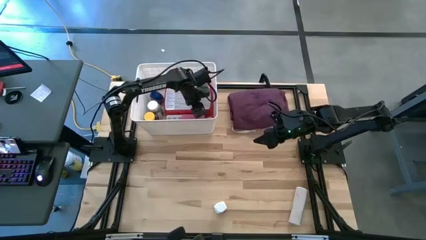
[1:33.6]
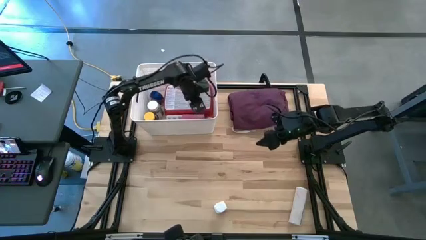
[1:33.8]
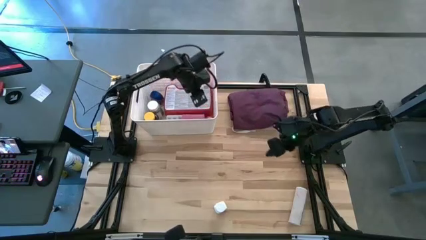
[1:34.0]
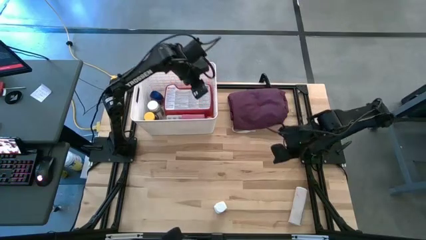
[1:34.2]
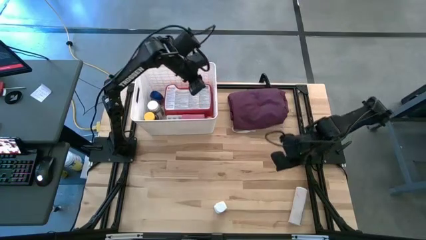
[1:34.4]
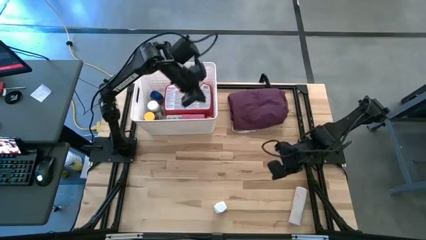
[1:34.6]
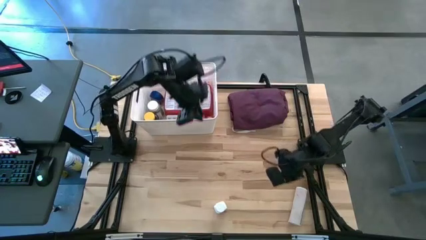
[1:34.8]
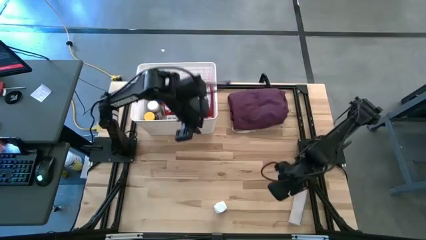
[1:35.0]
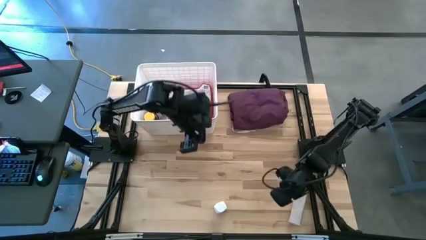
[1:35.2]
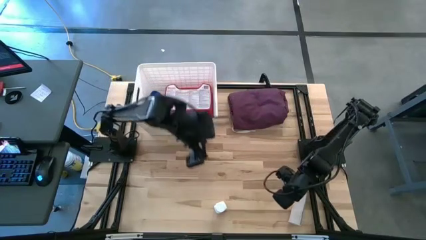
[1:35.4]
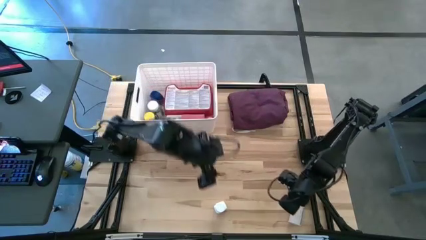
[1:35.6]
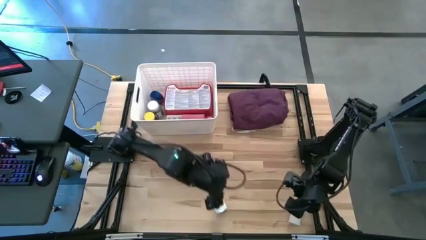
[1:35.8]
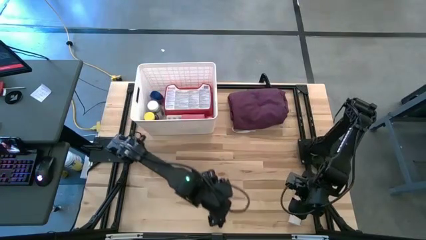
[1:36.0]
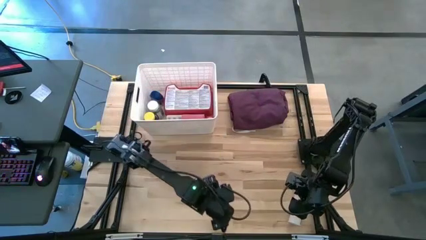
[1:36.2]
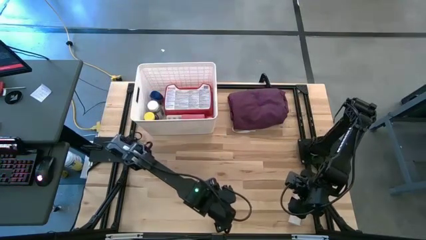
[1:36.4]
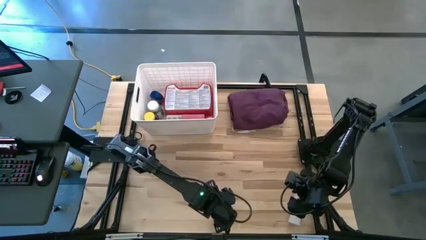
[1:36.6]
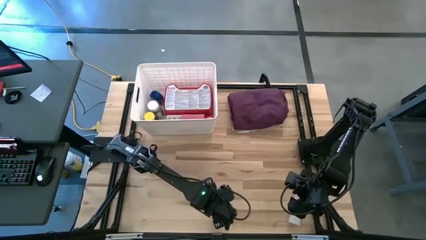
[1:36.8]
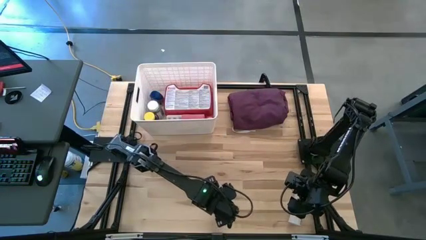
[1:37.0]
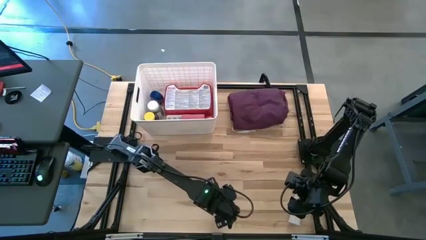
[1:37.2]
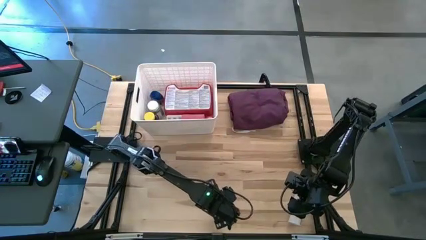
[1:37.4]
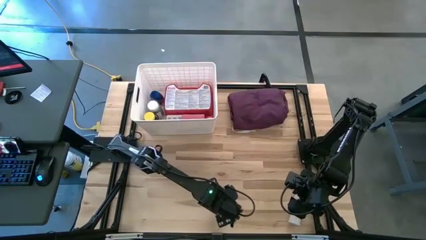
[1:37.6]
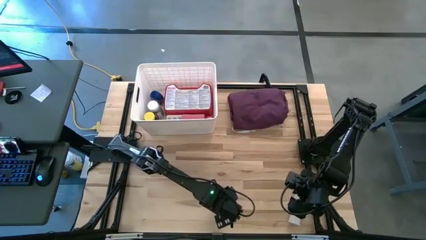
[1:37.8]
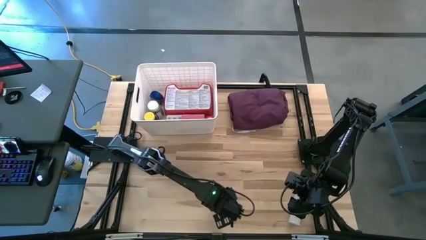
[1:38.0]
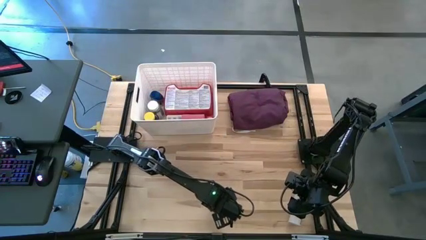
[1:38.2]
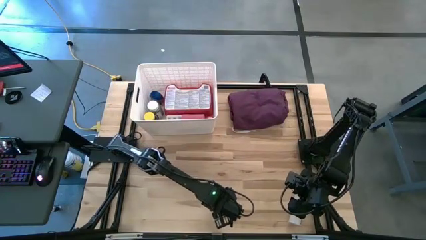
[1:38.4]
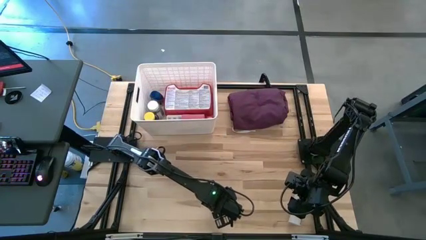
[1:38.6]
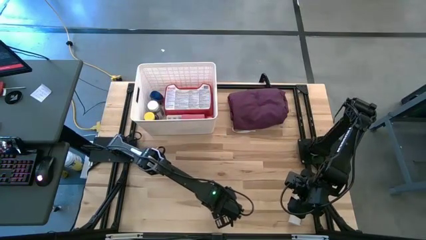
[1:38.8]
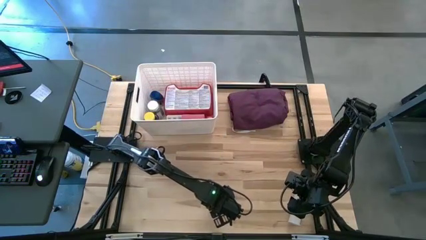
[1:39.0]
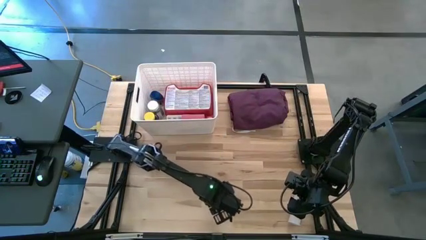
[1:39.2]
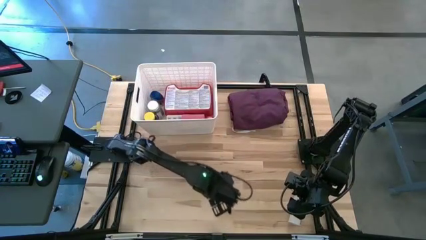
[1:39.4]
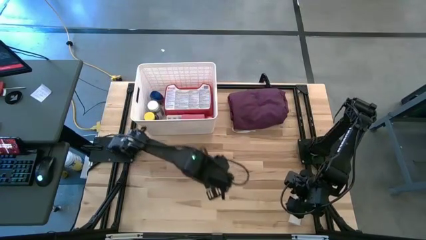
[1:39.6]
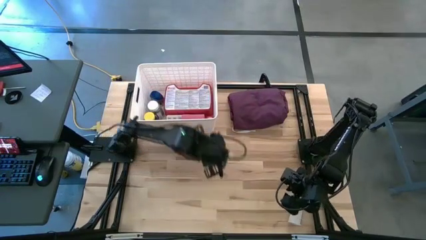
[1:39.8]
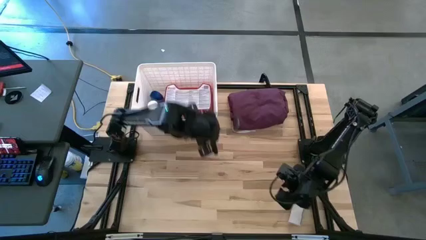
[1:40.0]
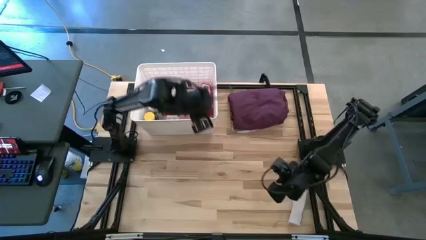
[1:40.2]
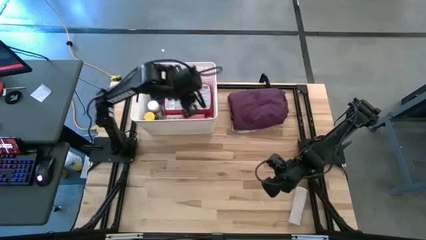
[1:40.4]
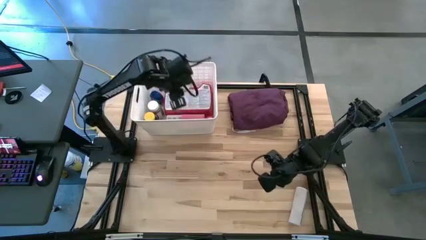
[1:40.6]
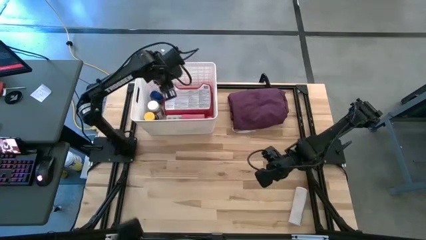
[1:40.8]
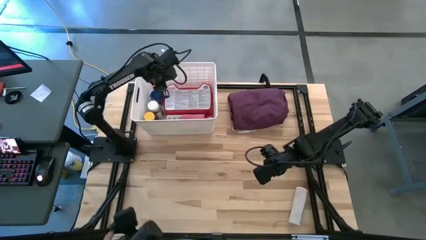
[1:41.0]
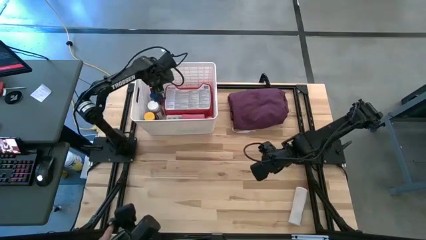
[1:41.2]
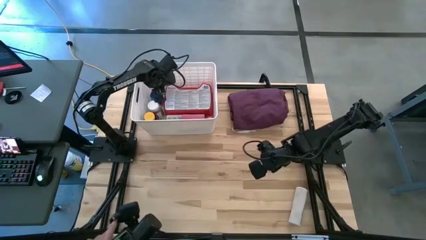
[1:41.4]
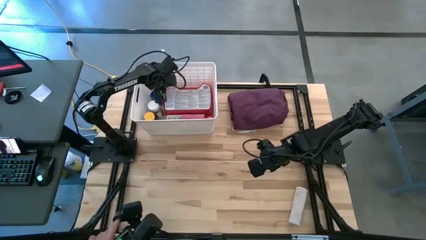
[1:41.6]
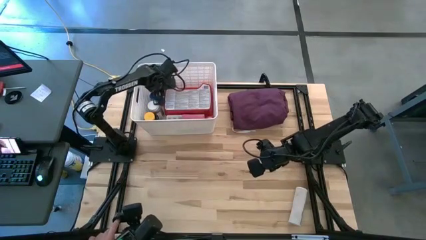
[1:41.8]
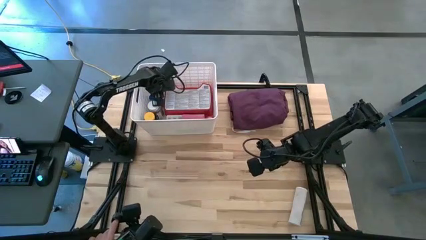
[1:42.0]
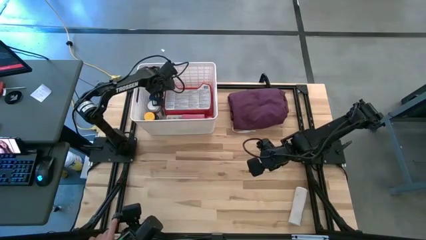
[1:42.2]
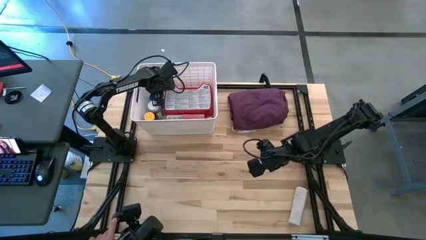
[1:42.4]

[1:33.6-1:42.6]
Task: Pick & place medical supplies in basket/bin
Put the white pill bottle into the white bin

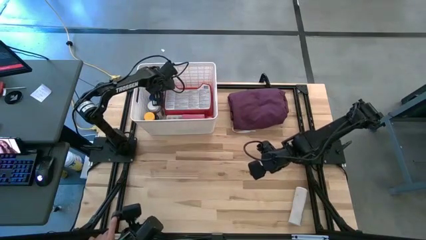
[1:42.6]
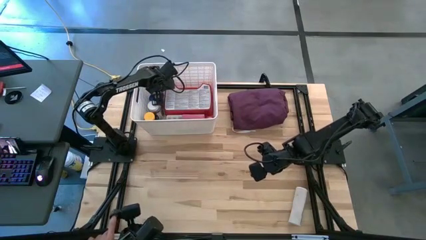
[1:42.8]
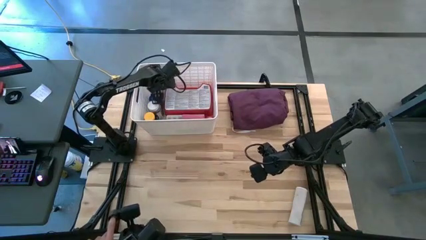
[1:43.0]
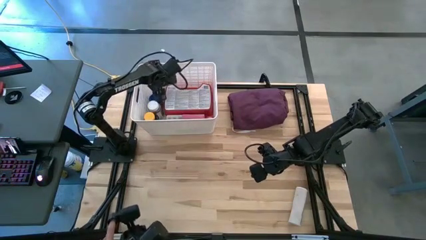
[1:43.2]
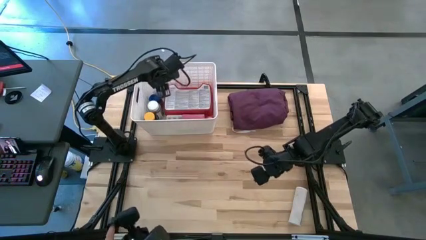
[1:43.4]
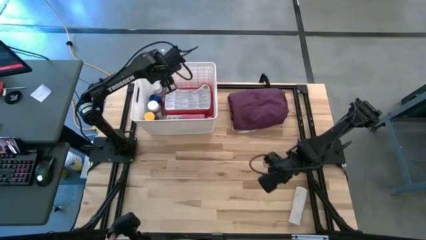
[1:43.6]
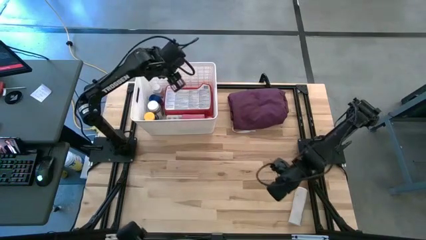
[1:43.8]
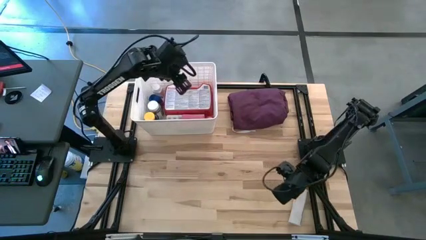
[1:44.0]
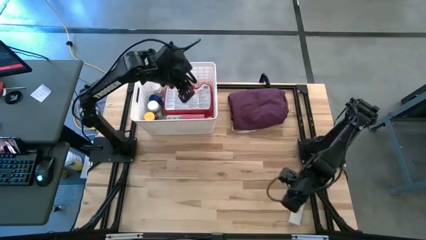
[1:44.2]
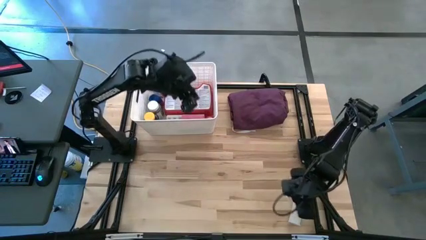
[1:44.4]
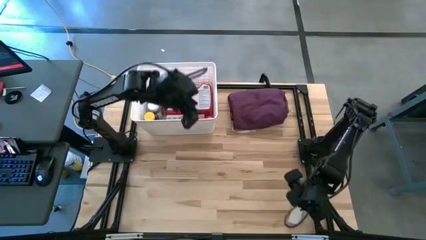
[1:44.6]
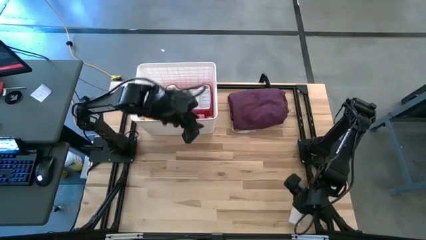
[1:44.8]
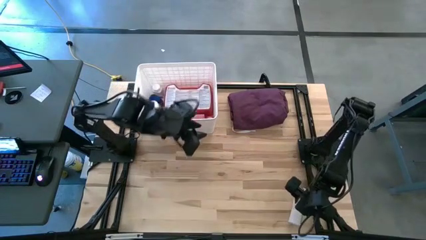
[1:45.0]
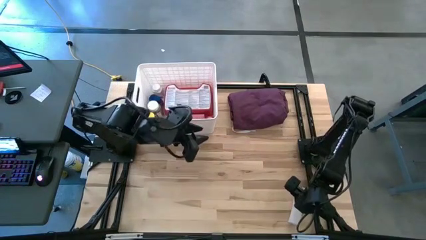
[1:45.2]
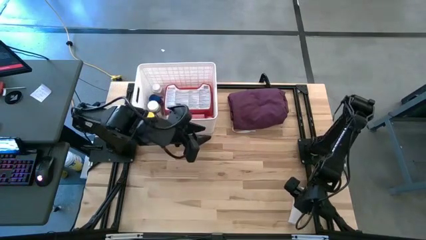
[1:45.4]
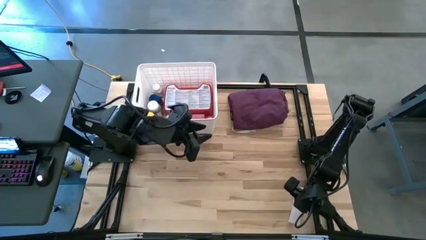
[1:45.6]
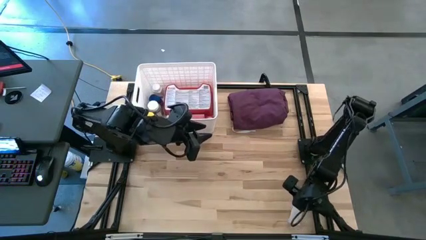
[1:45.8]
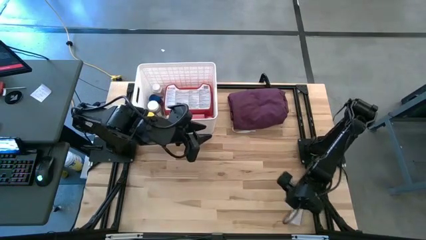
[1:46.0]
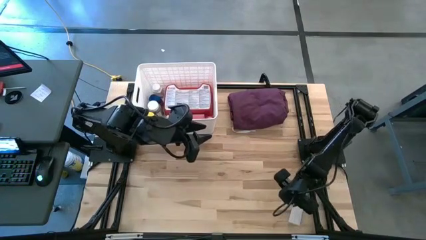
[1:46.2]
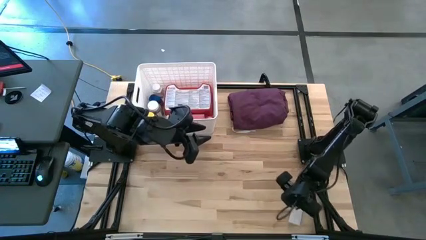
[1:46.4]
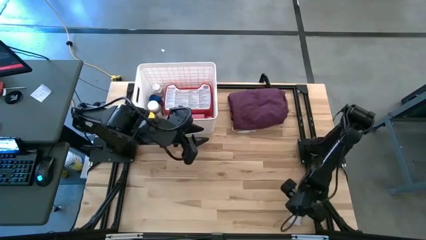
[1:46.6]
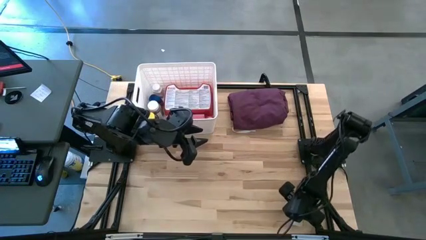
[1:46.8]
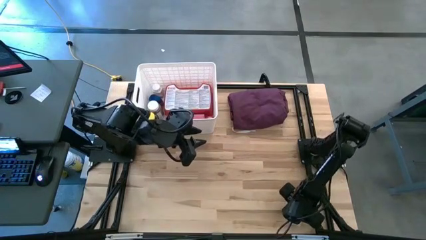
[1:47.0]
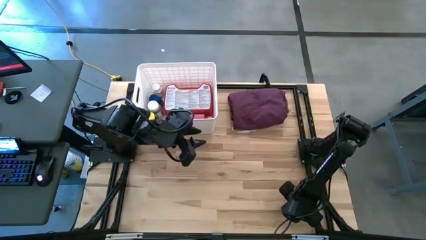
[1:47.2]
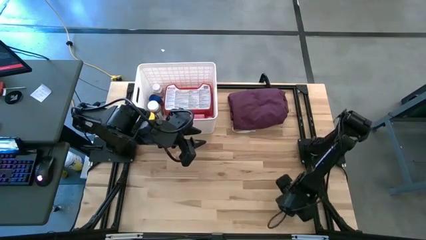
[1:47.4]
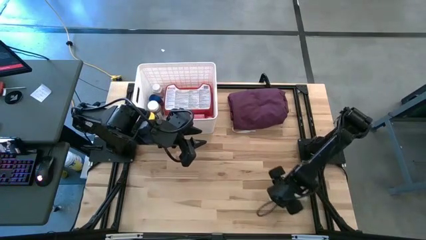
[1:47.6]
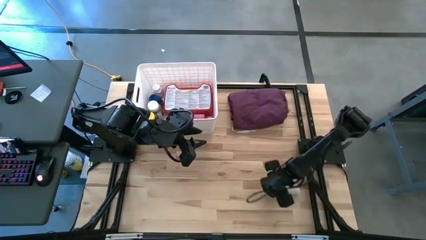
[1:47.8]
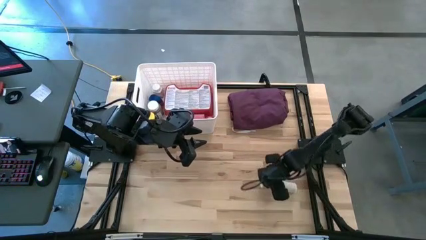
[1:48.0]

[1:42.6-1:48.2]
Put the white bandage into the white bin
